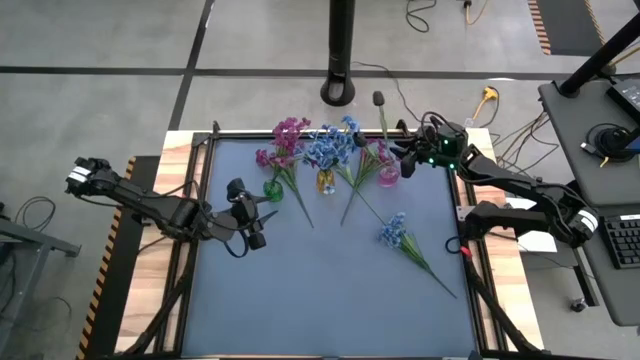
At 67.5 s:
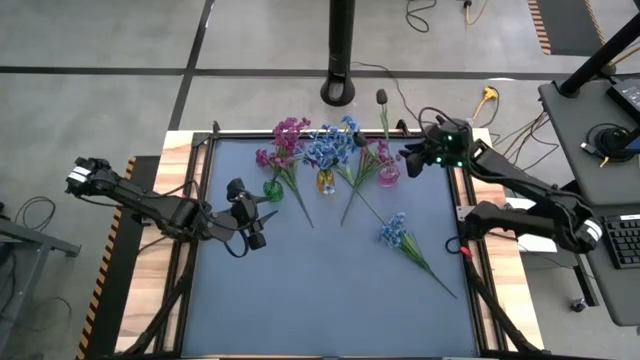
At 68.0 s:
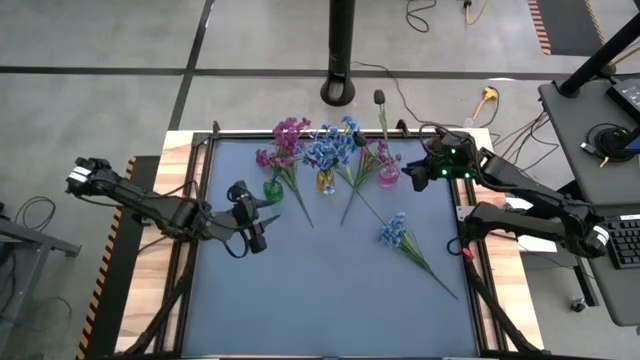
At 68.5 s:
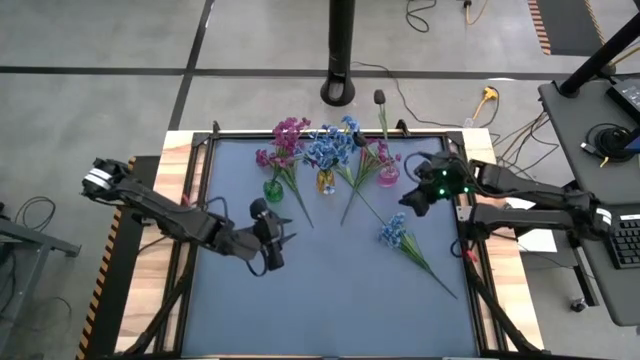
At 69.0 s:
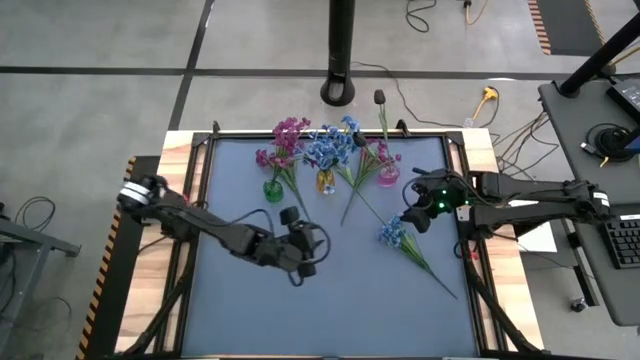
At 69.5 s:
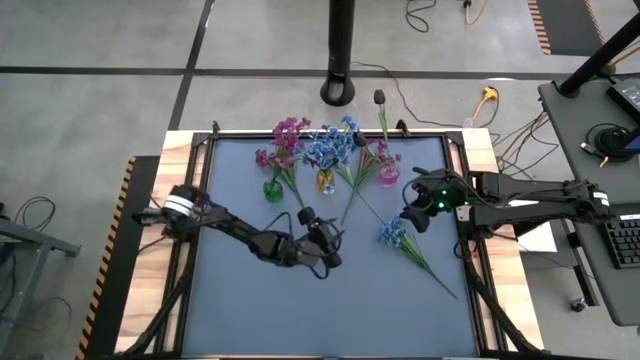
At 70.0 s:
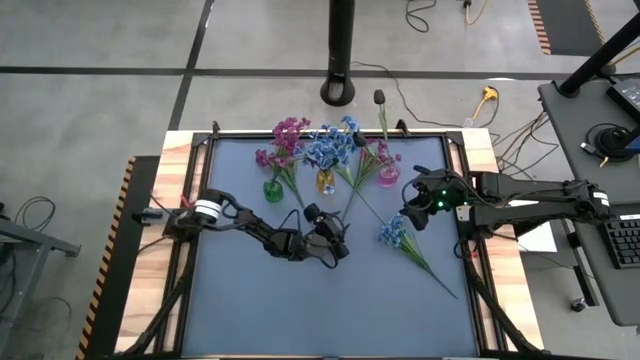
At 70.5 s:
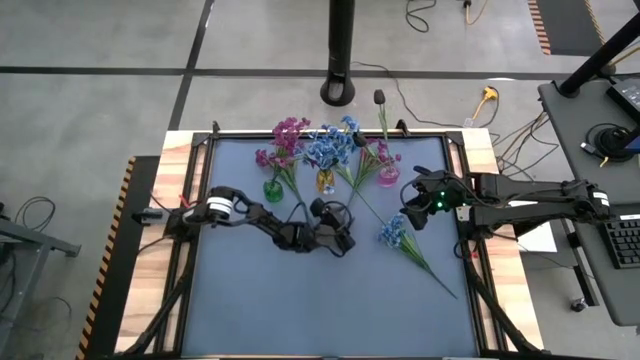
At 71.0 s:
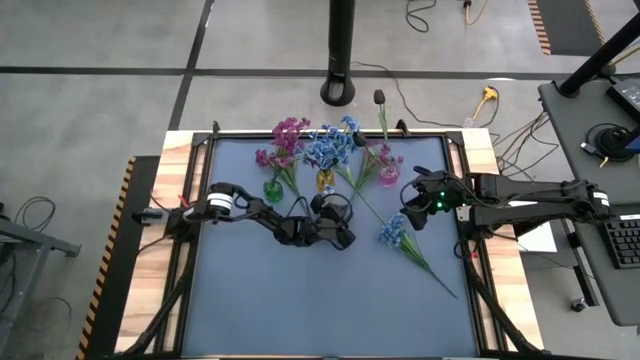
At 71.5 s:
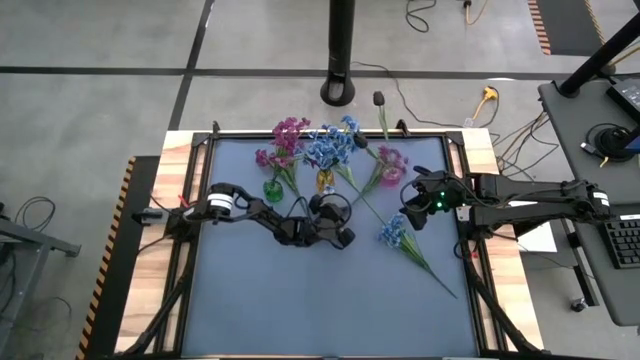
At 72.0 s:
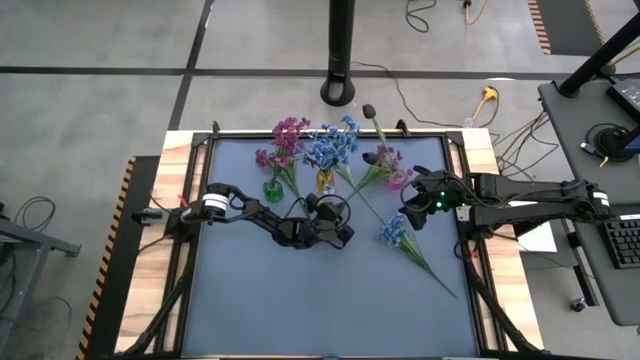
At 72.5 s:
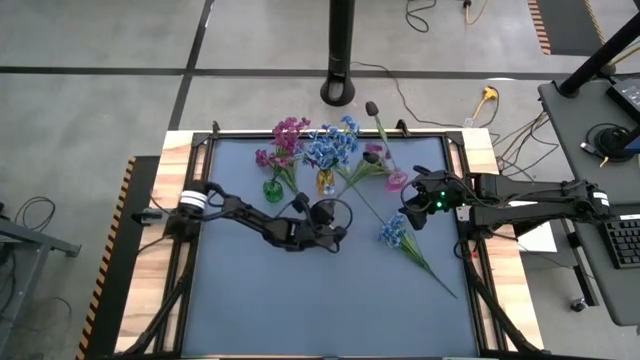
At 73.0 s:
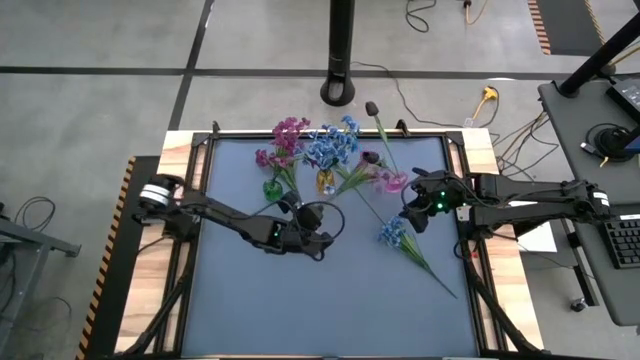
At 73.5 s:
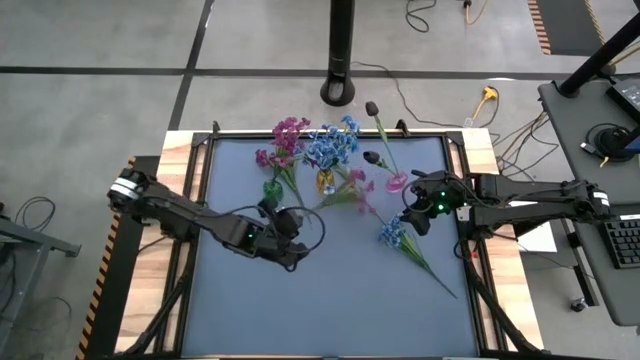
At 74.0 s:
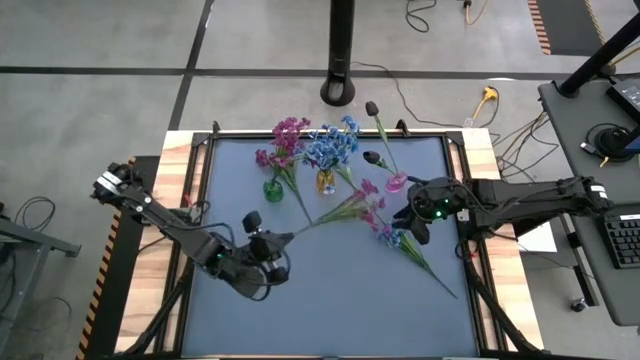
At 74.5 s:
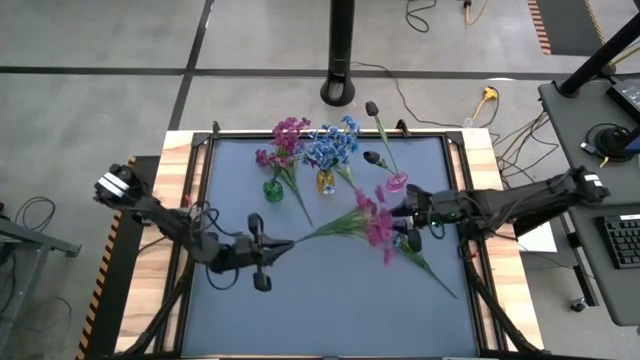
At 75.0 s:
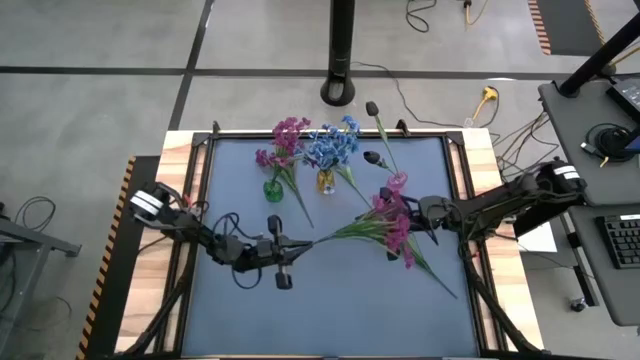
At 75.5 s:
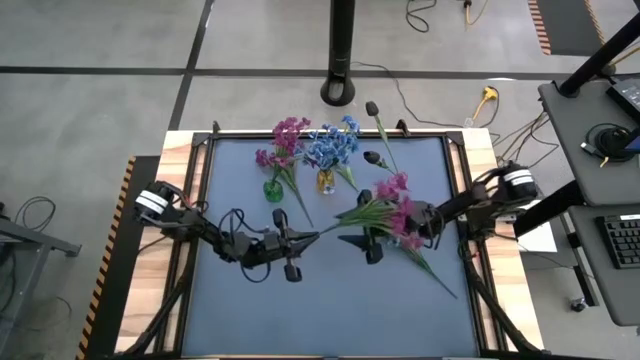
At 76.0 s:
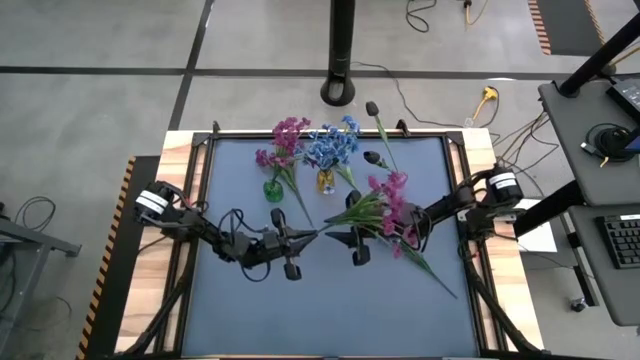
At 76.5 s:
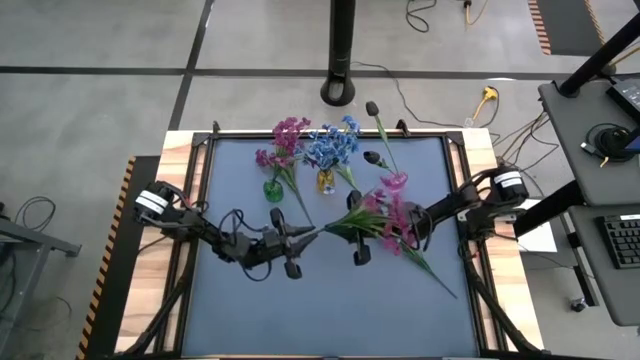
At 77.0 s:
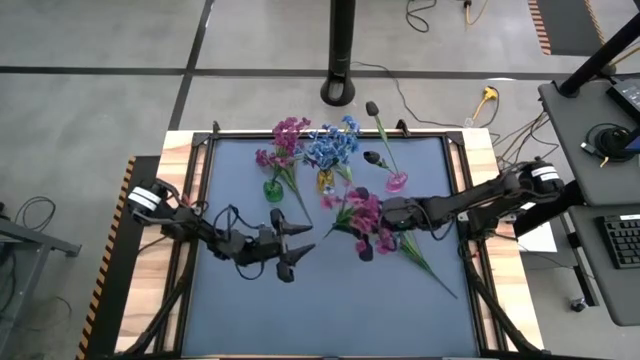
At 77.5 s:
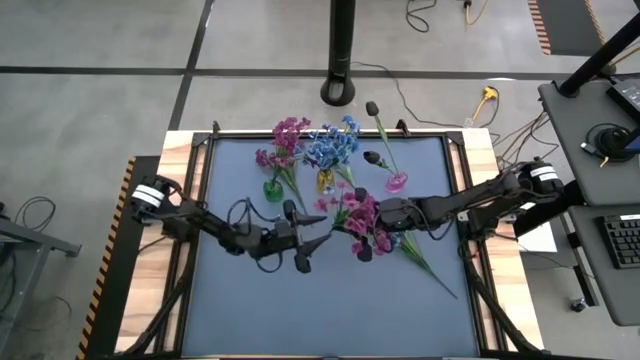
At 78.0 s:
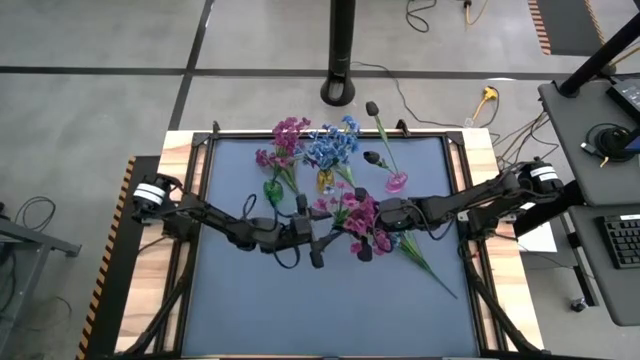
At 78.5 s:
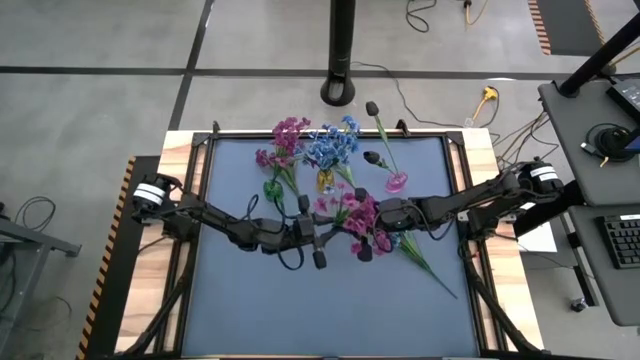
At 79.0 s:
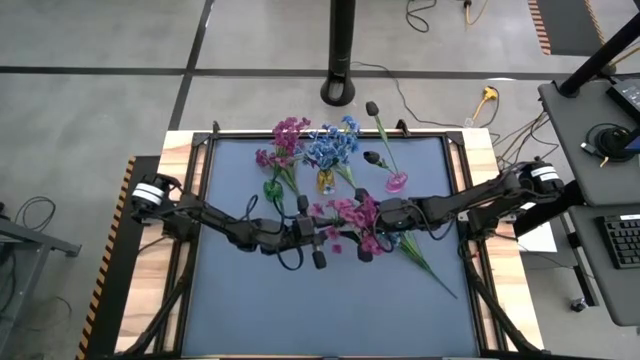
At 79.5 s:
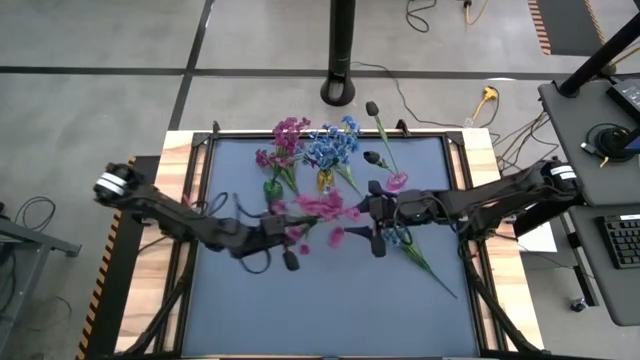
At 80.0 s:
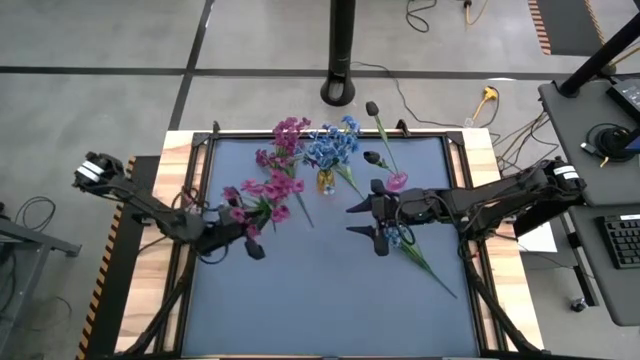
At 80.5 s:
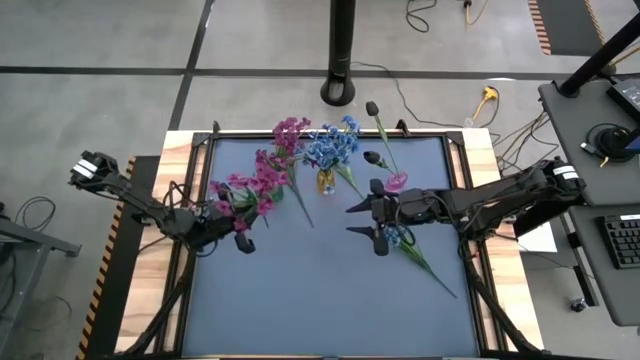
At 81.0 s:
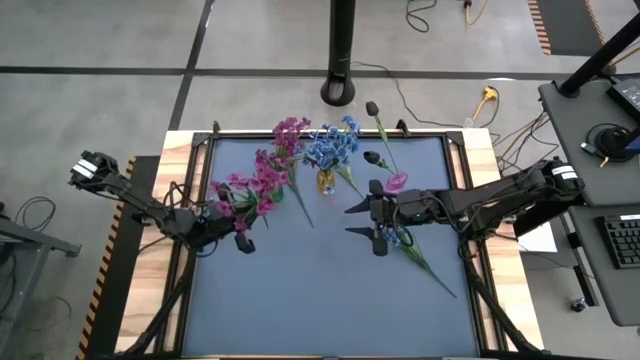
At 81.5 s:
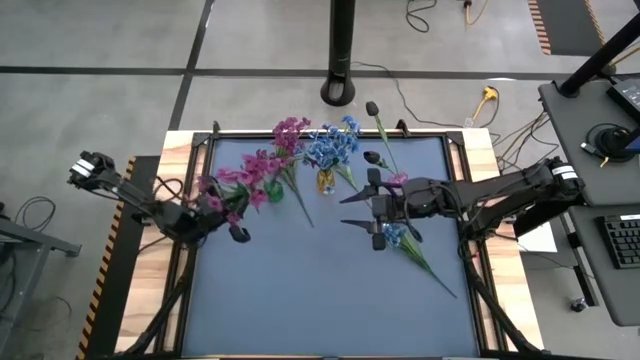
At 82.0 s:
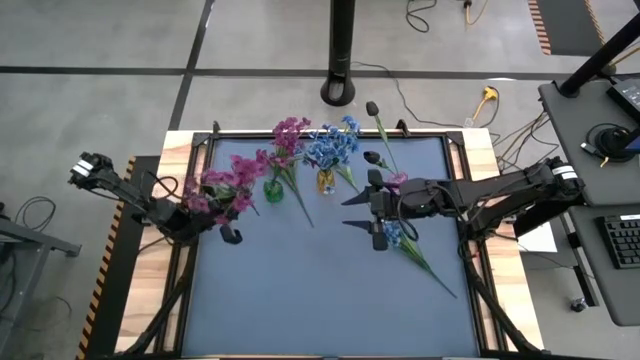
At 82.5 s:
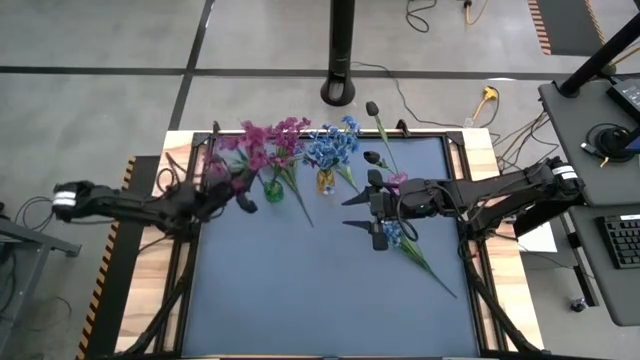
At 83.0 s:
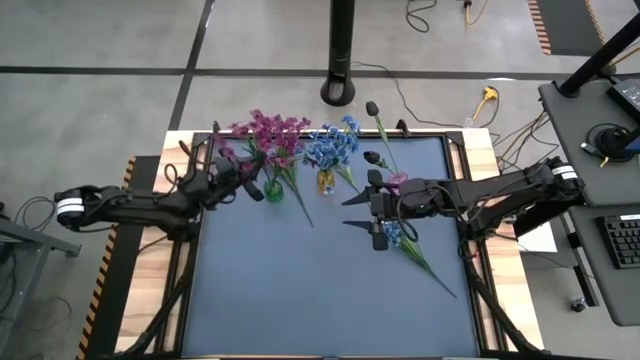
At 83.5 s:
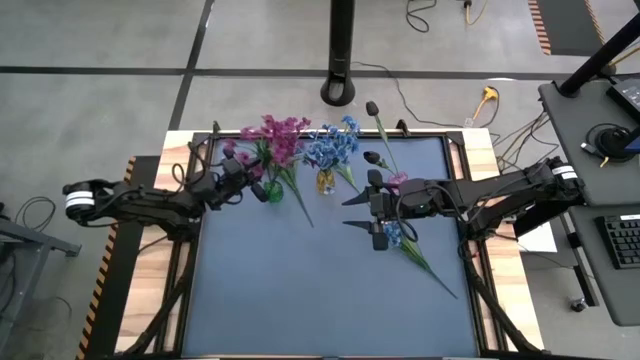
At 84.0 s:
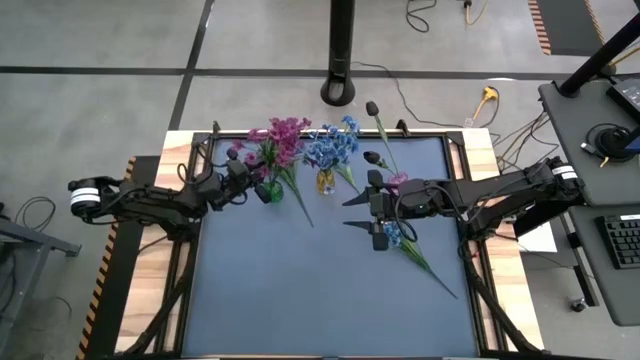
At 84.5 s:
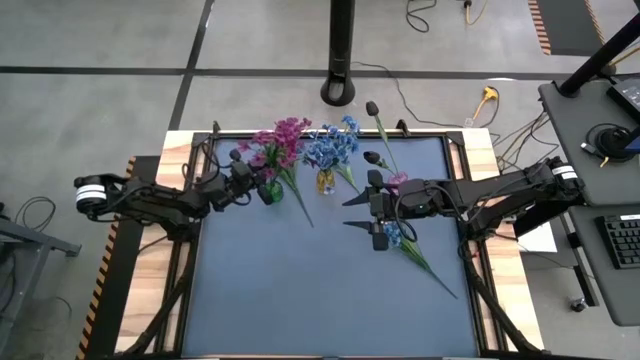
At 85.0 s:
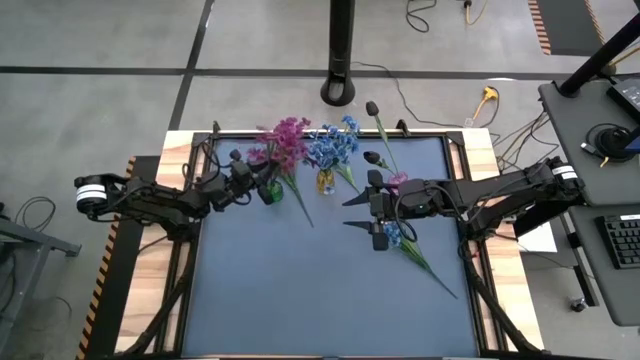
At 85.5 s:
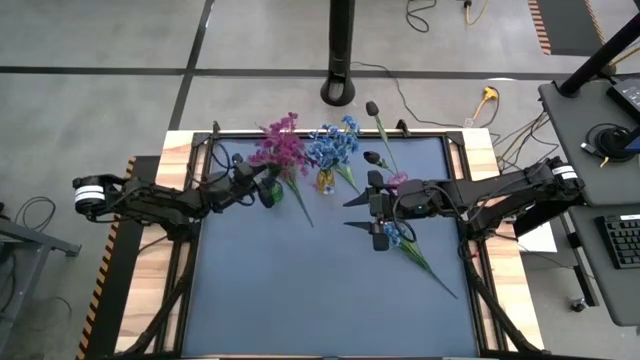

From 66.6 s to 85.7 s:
Task: Sort flowers into vase by color
Put the right purple flowers into the green flower vase
